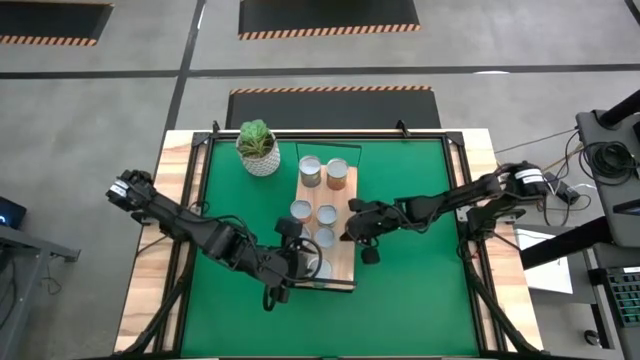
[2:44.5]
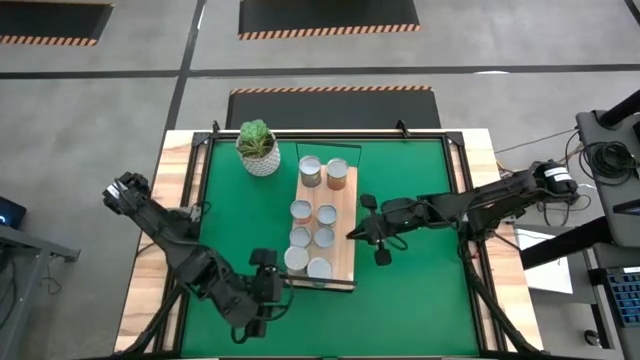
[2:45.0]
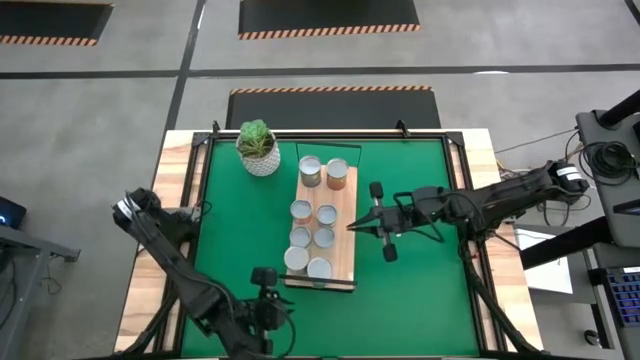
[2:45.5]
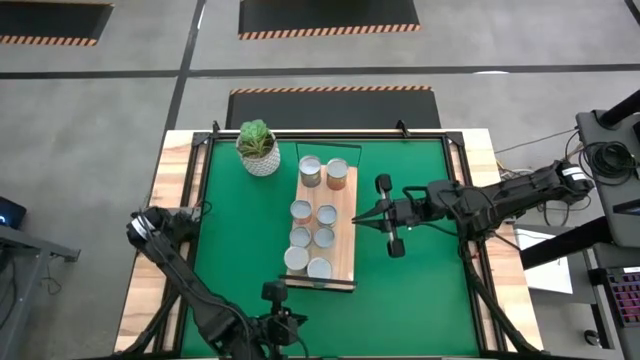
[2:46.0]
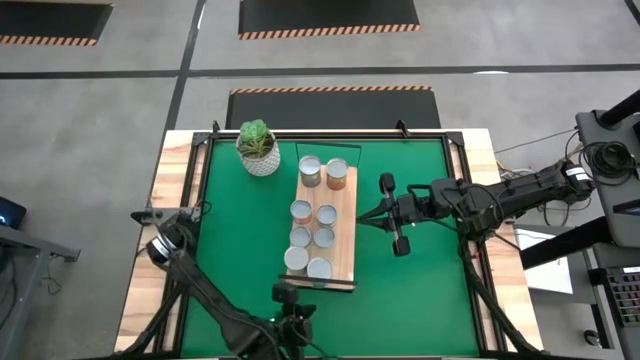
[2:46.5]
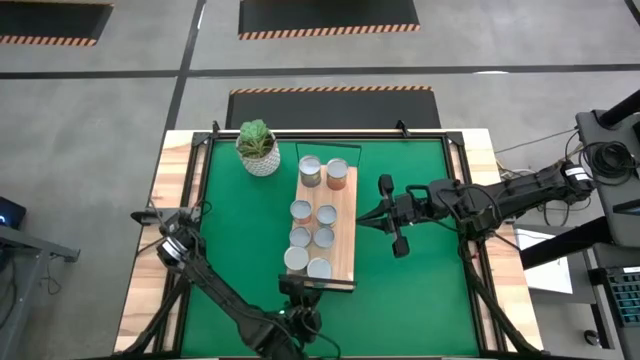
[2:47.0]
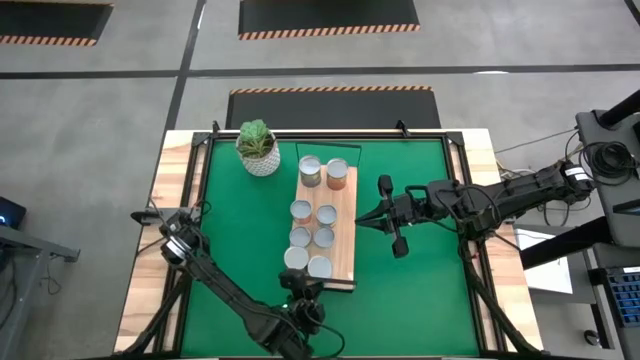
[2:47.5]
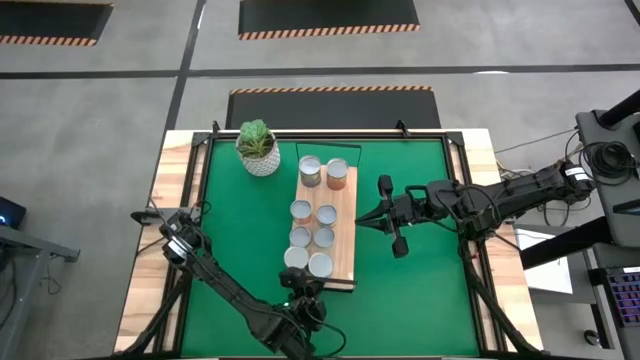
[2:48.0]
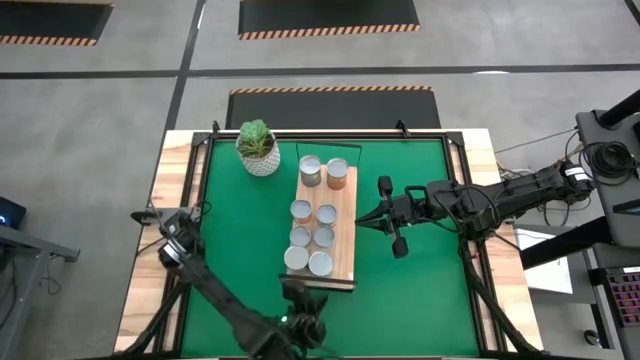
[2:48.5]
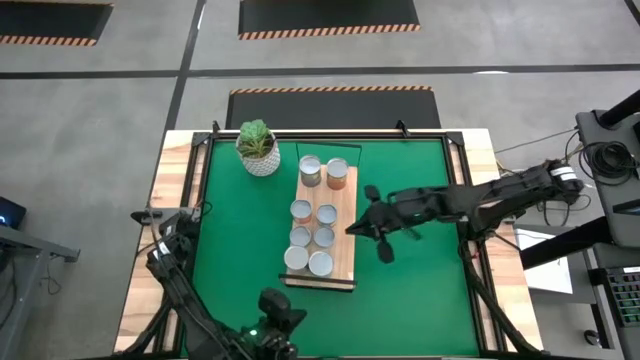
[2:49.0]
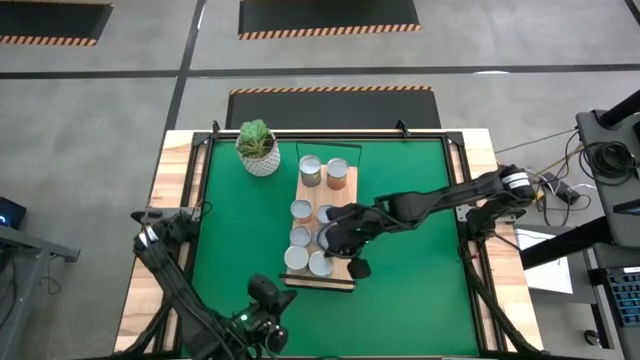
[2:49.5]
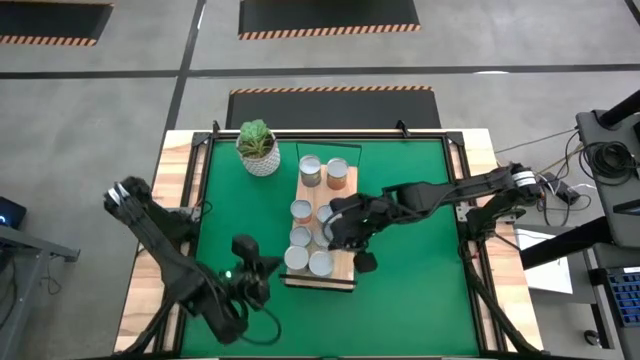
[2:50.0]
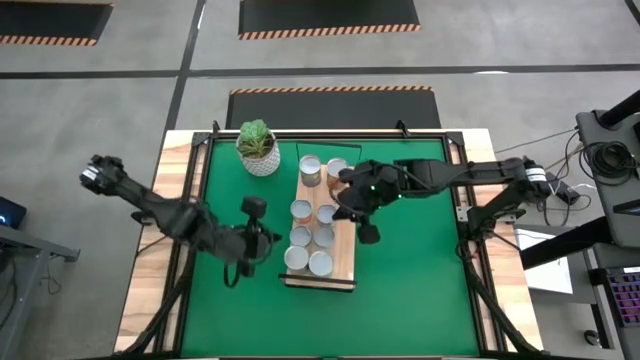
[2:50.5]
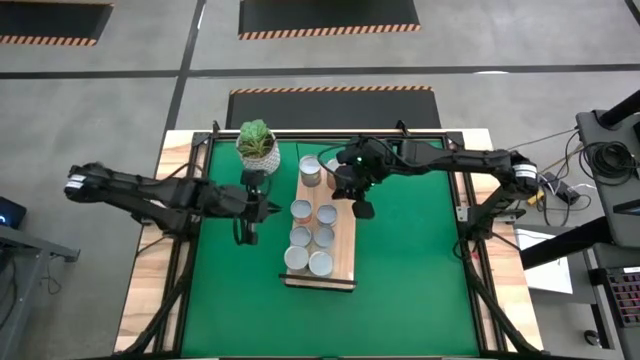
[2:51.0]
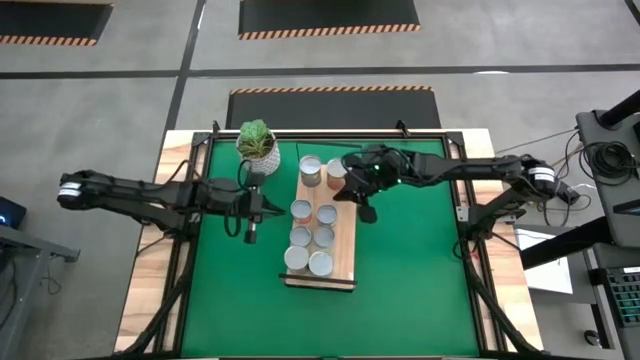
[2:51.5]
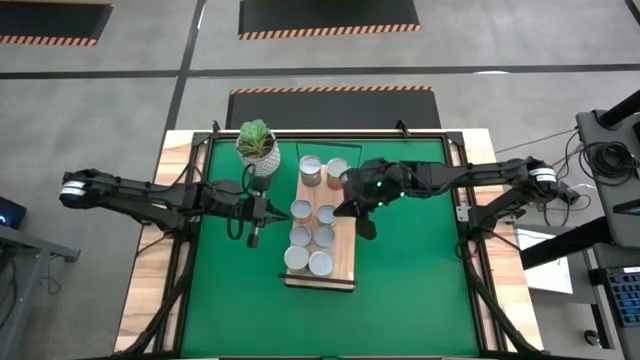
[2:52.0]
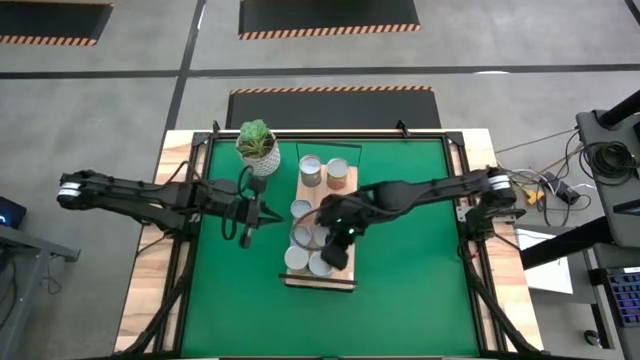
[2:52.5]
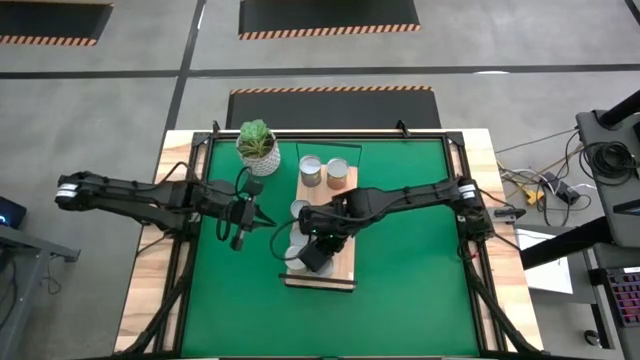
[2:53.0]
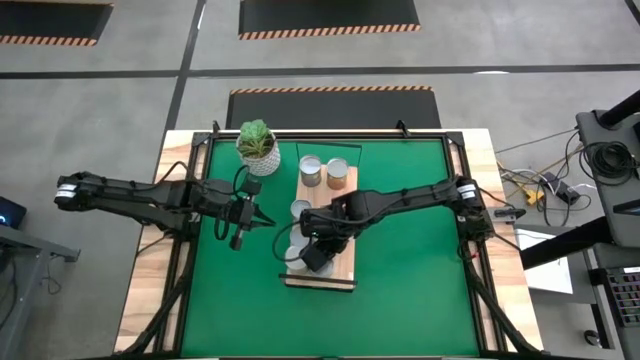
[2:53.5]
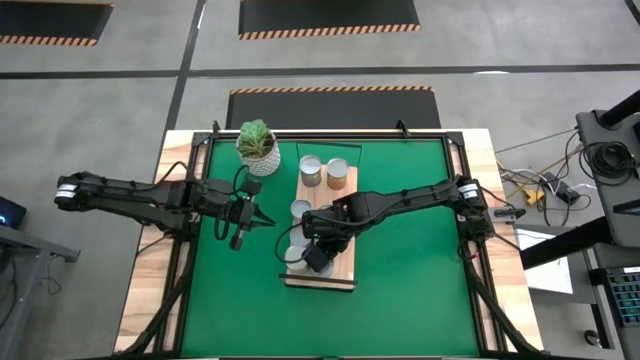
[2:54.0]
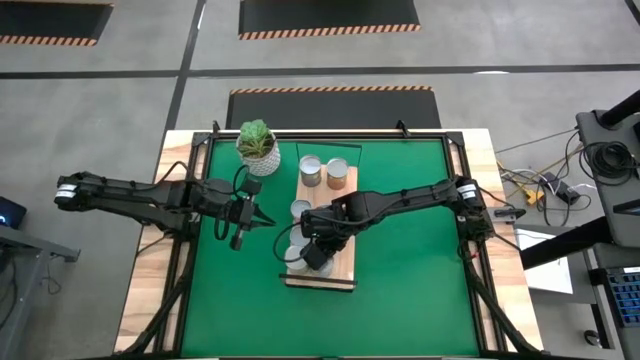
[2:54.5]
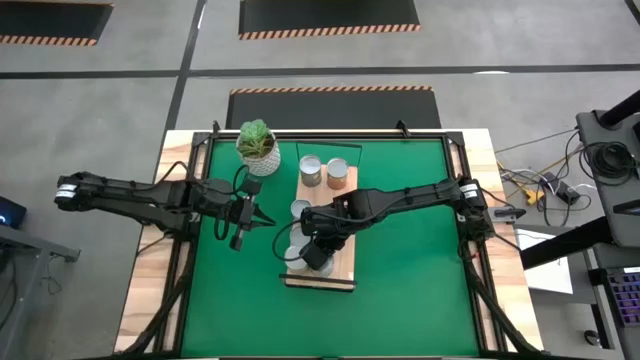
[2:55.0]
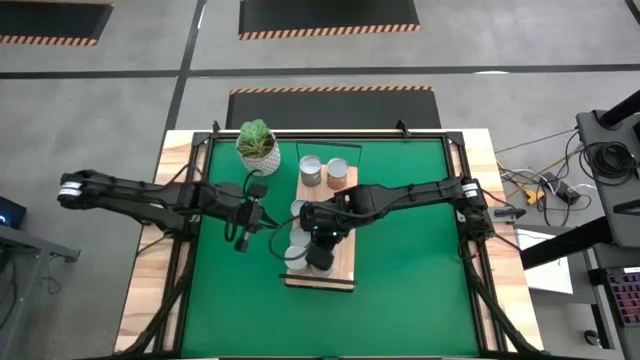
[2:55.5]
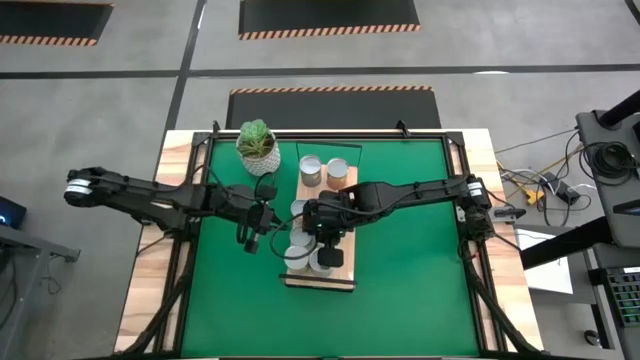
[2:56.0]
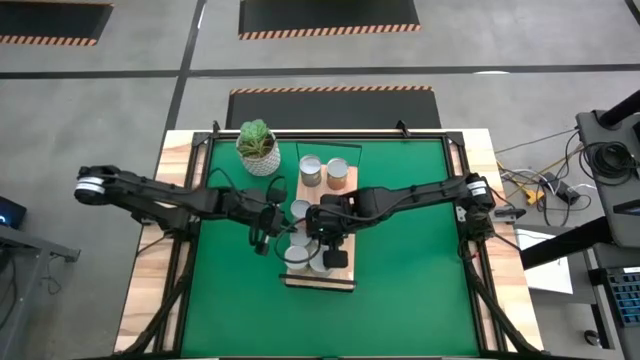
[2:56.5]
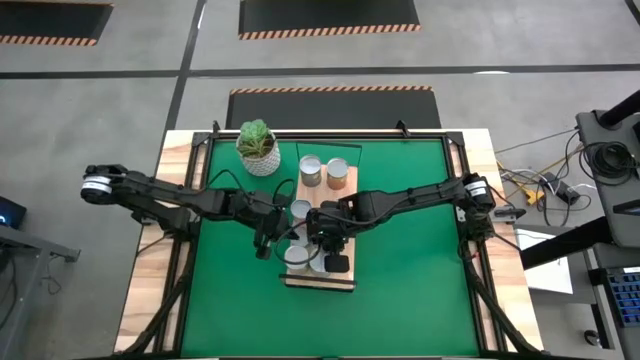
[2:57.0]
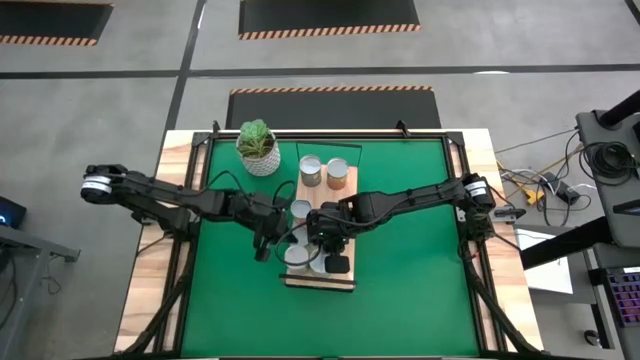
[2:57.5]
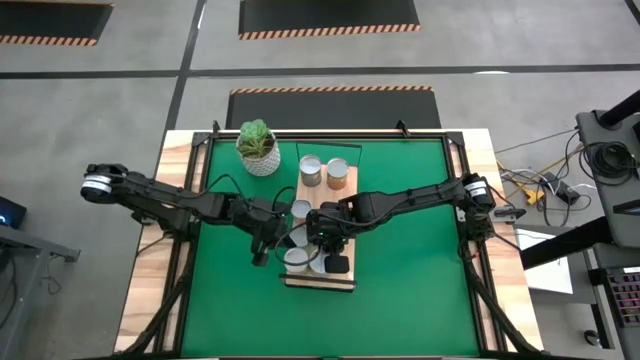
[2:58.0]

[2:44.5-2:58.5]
Task: Pick and place cans onto a shelf
Adjust the canned goods on the shelf

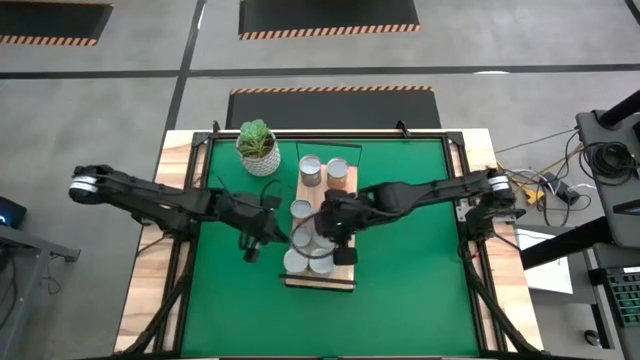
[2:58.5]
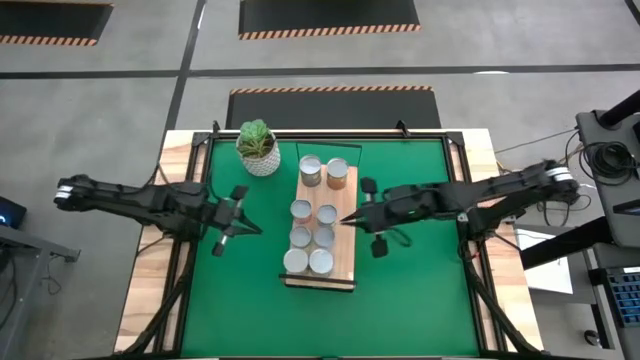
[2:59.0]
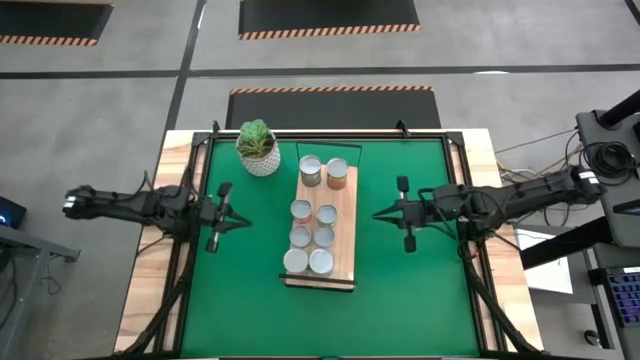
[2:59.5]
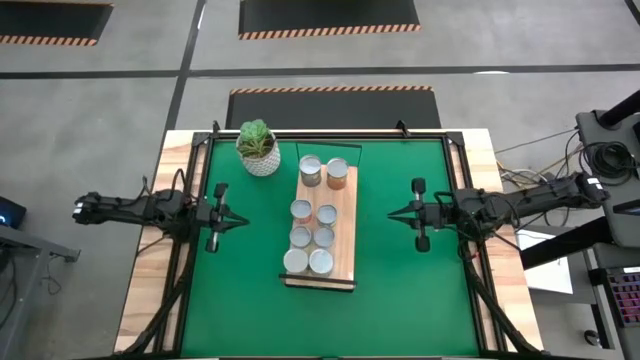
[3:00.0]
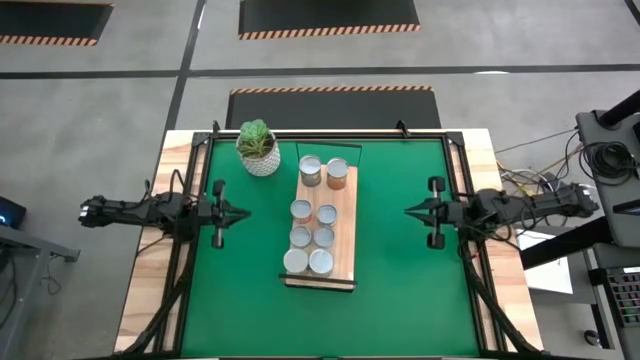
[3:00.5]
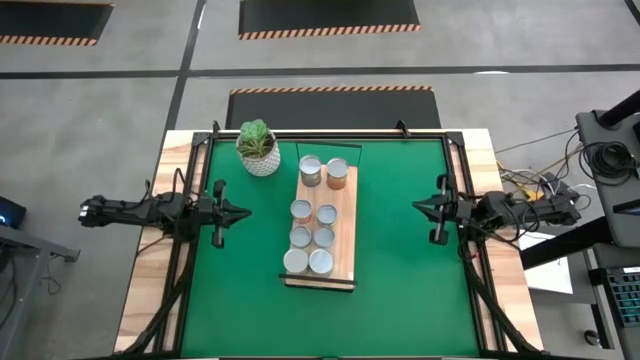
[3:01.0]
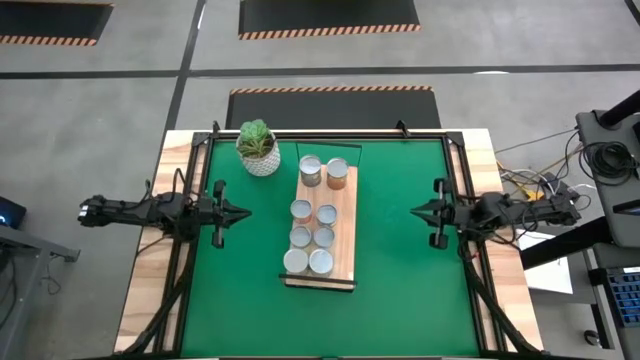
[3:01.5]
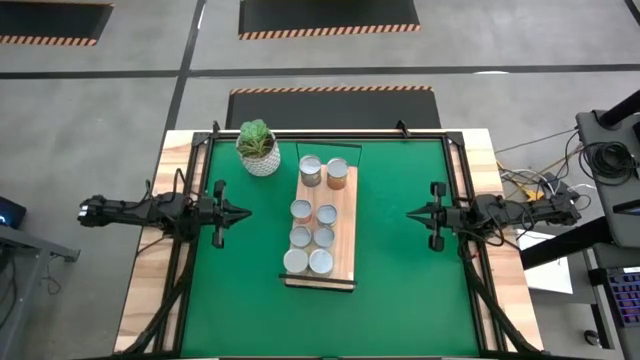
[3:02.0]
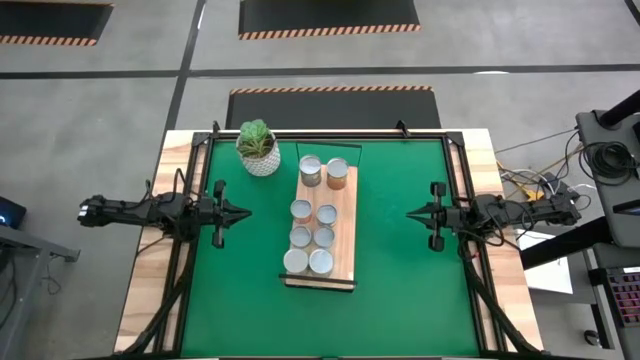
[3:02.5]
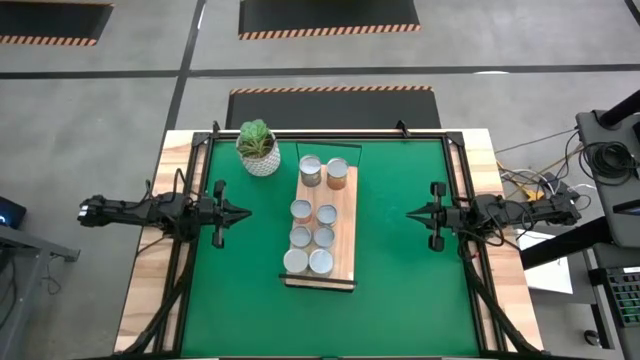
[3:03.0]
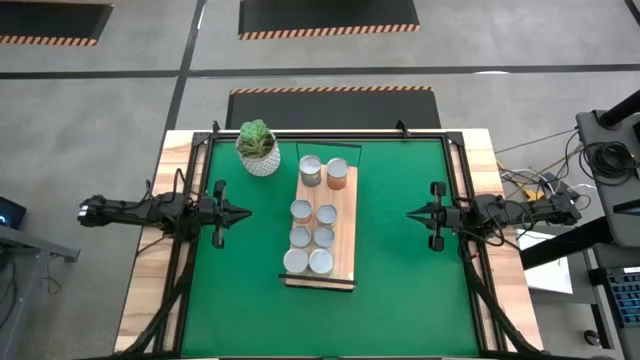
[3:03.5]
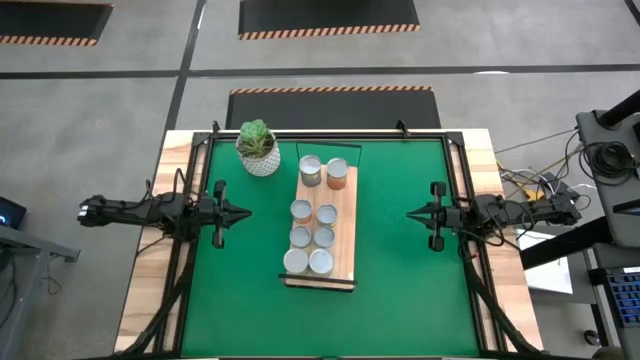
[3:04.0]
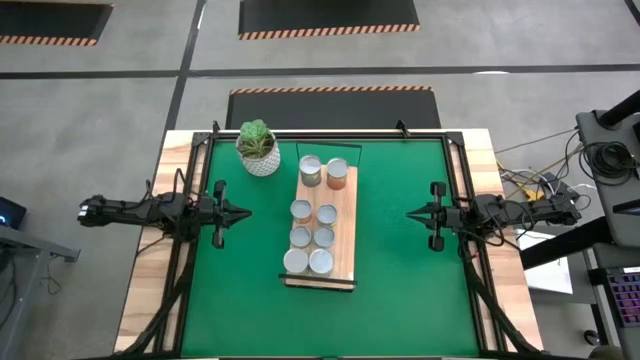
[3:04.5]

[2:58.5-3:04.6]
Return to Home Position

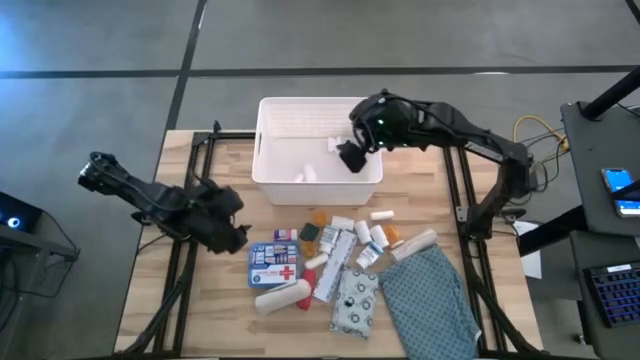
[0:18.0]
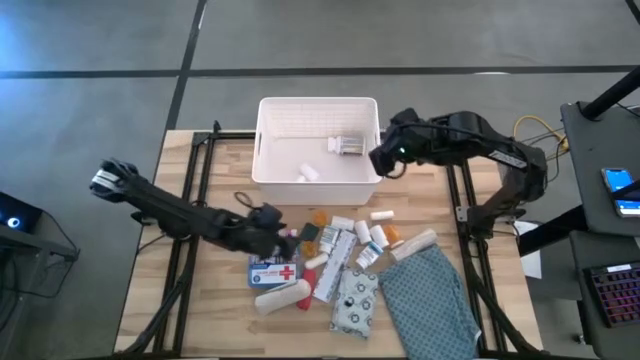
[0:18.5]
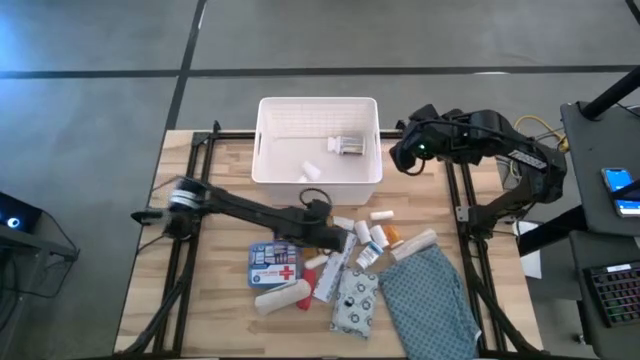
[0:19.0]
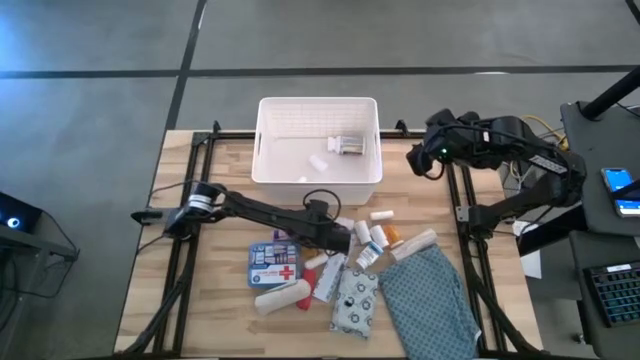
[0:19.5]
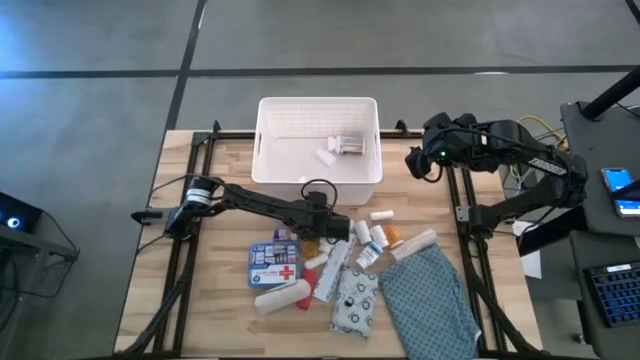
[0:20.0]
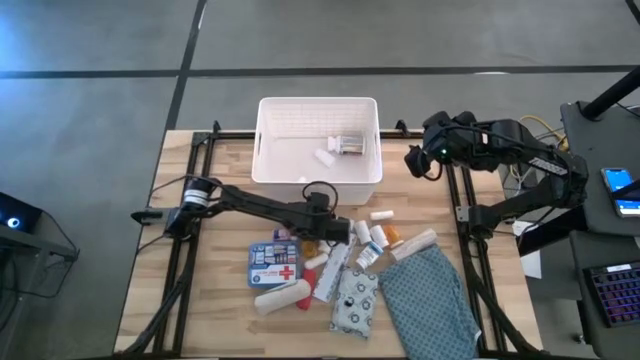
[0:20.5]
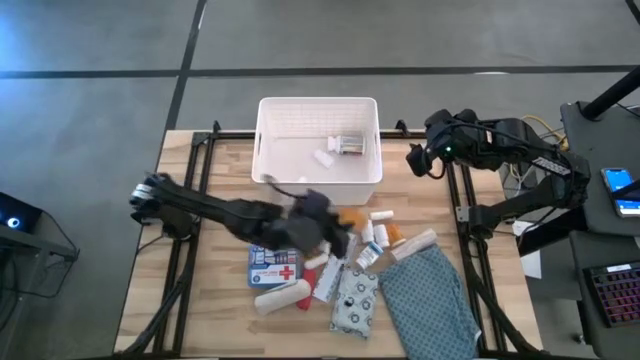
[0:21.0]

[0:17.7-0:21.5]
Task: Pick & place medical supplies in basket/bin
Put the orange bottle into the white bin
